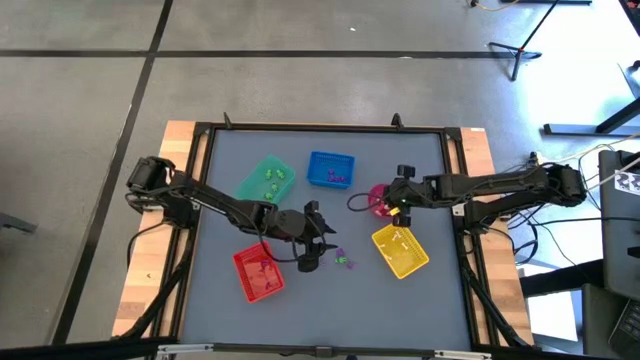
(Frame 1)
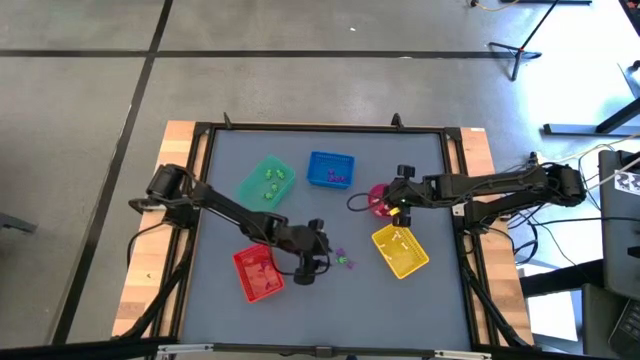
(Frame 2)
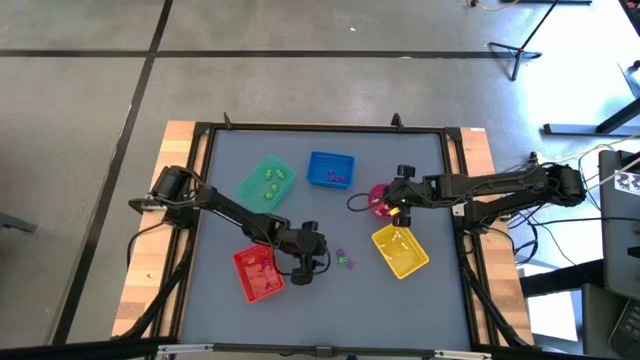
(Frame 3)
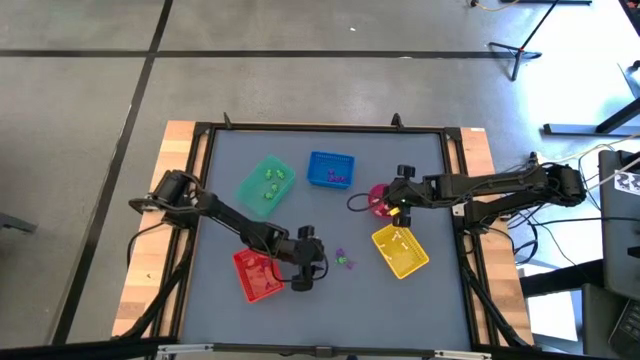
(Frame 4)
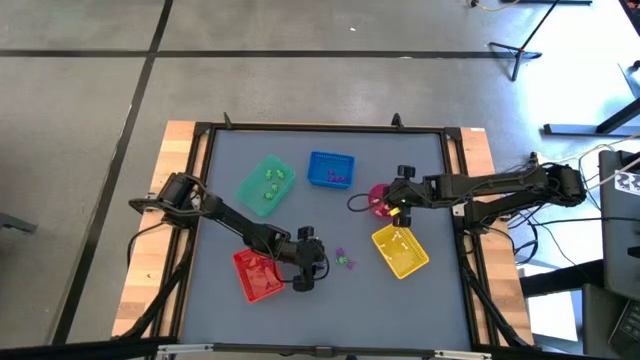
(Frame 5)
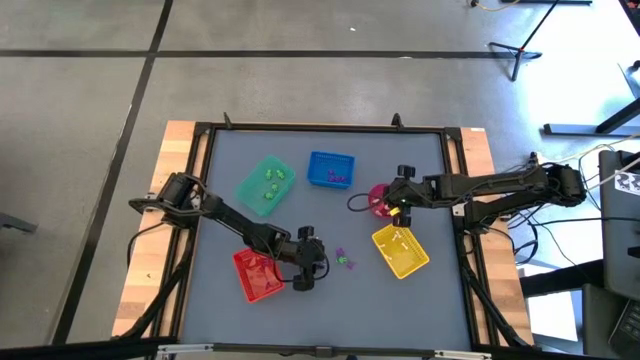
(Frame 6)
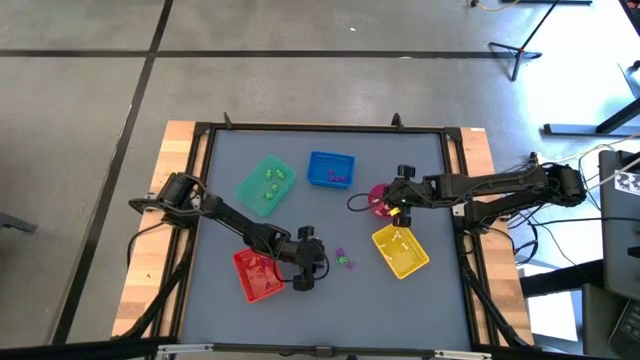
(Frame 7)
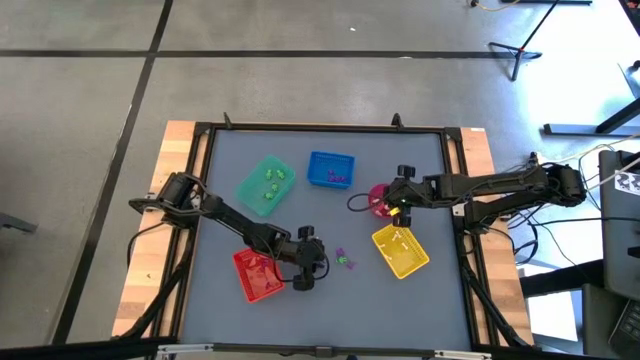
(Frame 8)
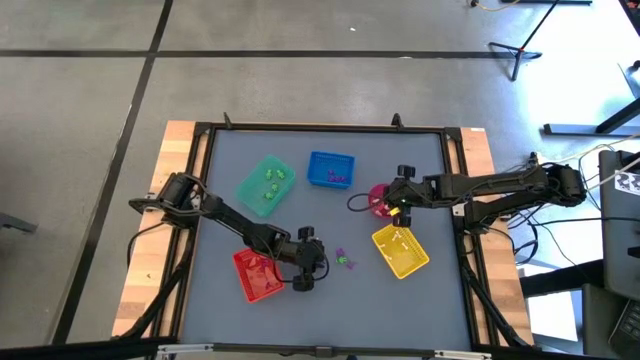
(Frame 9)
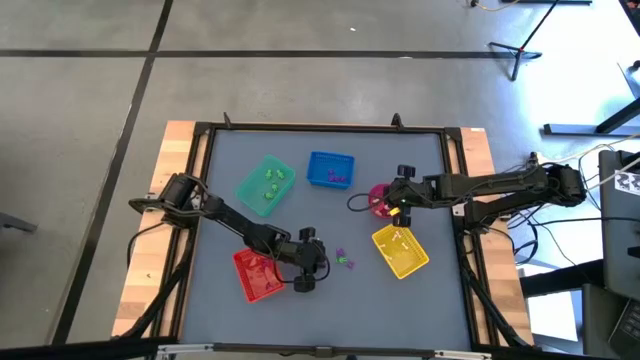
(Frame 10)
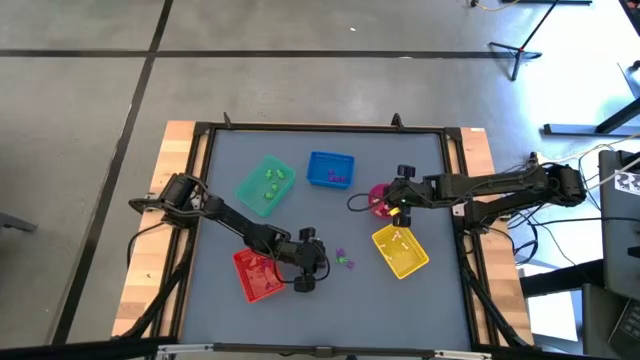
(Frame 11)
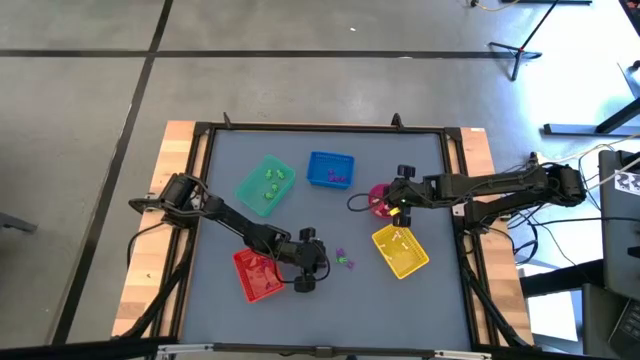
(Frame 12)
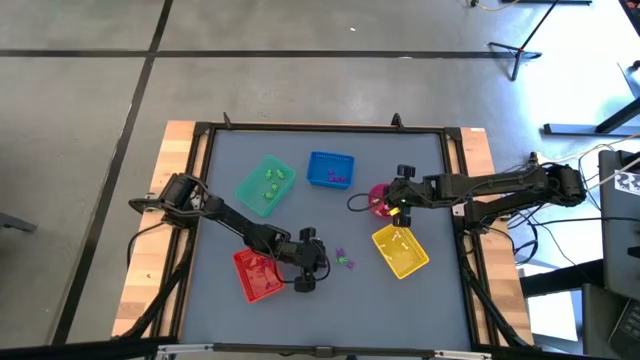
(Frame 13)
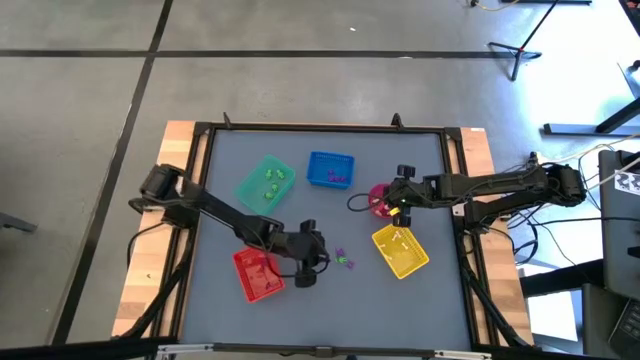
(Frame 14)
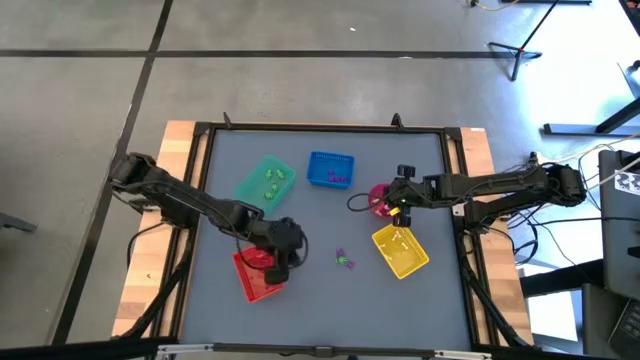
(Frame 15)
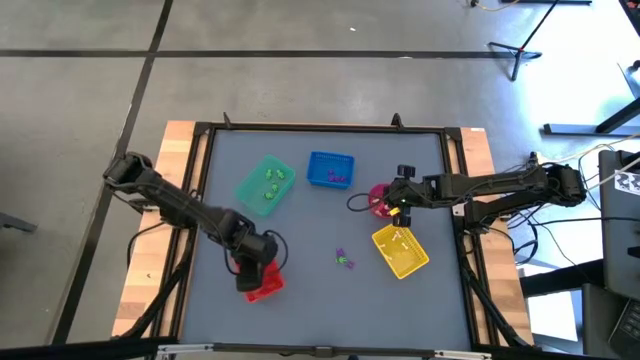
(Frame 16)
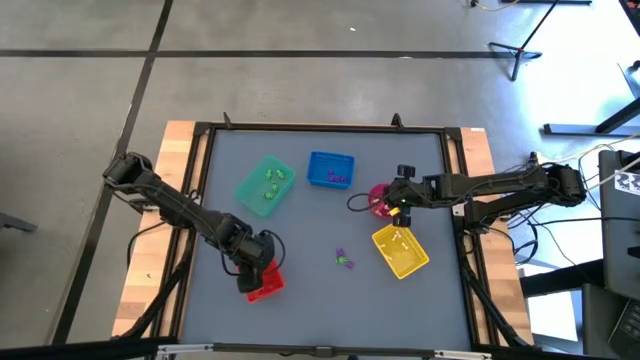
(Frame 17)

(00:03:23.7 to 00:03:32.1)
Task: Sort Halloween decoration
Put the purple witch hat toy into the orange bin

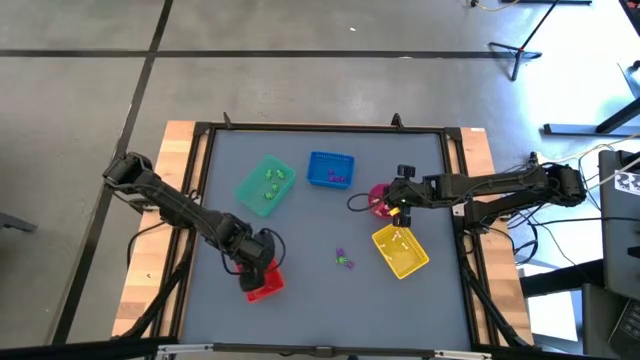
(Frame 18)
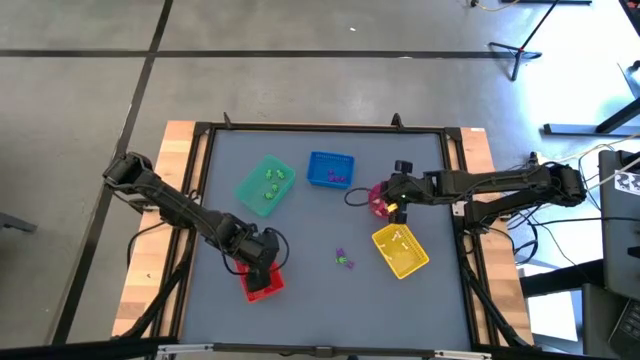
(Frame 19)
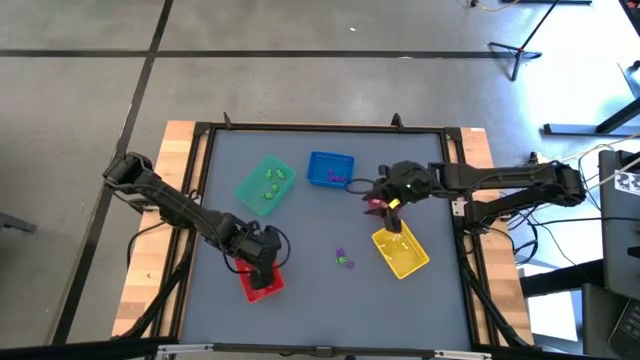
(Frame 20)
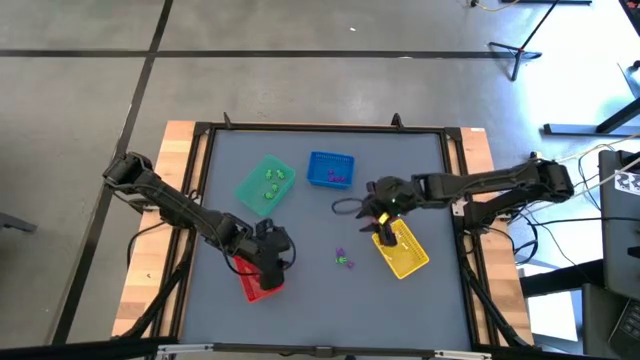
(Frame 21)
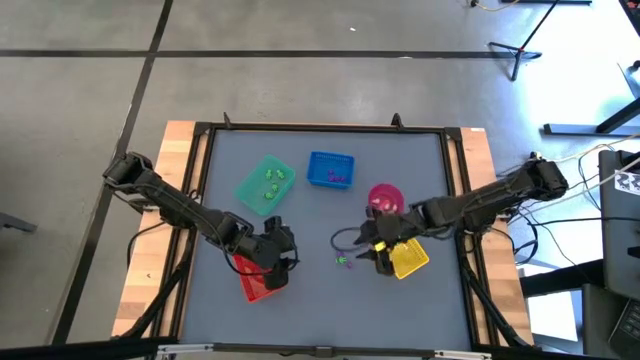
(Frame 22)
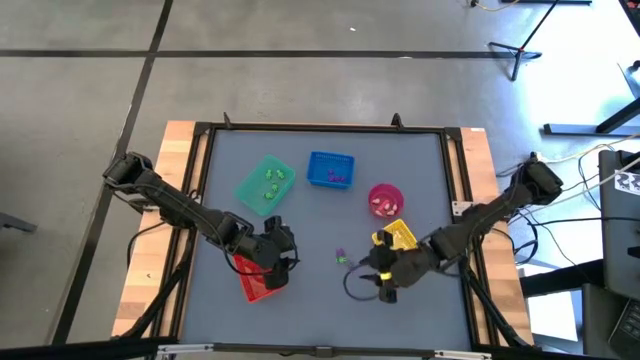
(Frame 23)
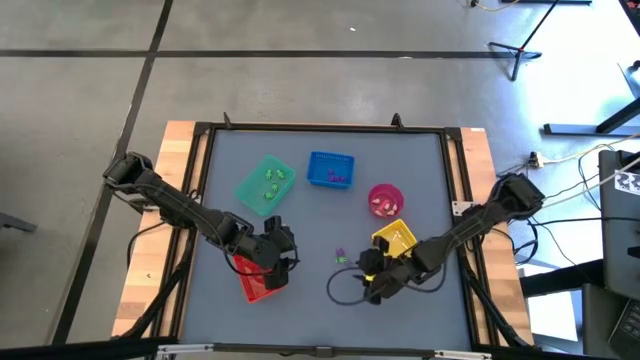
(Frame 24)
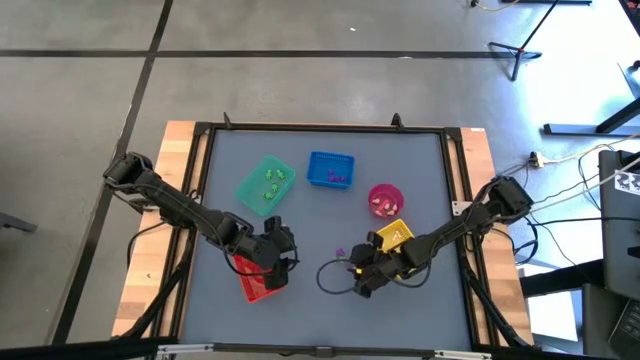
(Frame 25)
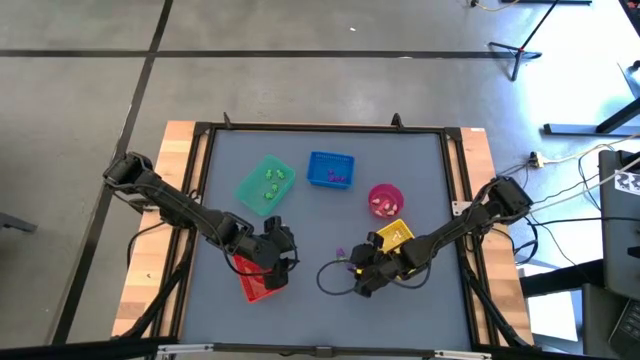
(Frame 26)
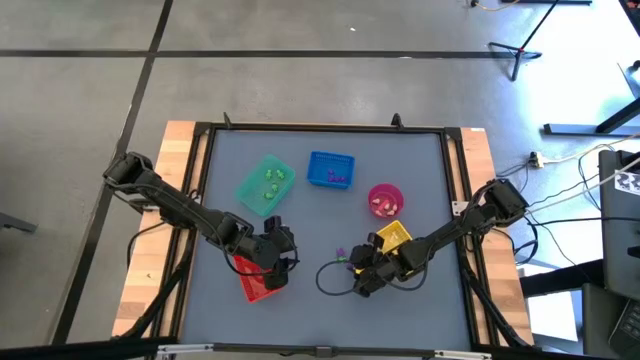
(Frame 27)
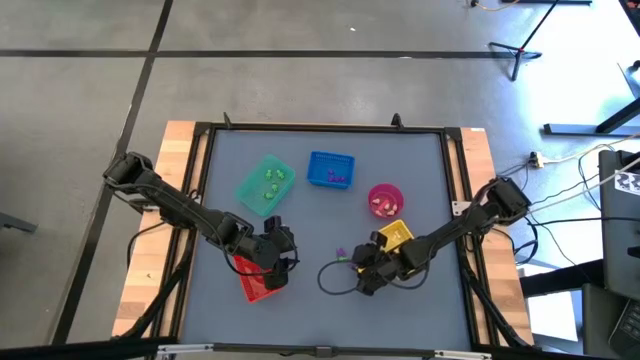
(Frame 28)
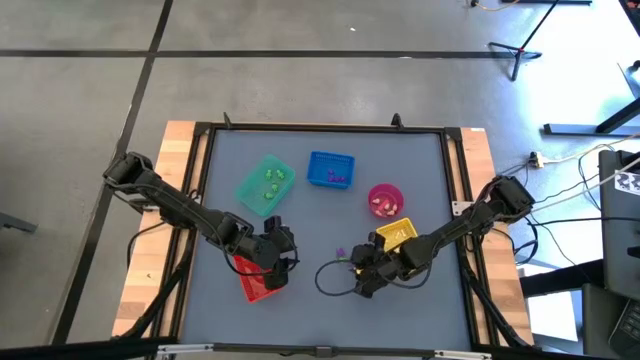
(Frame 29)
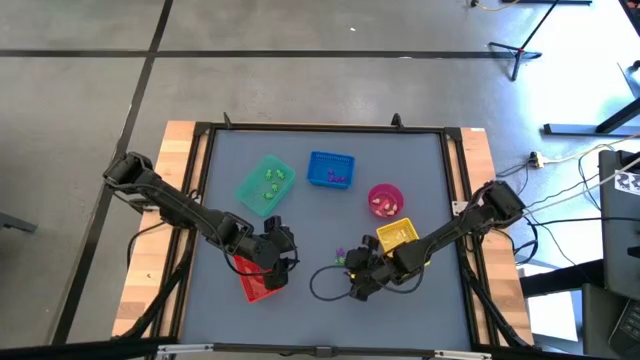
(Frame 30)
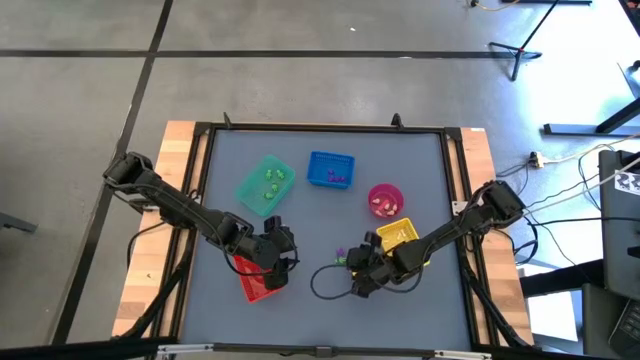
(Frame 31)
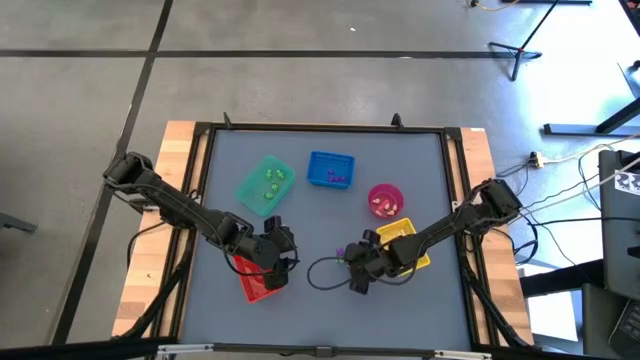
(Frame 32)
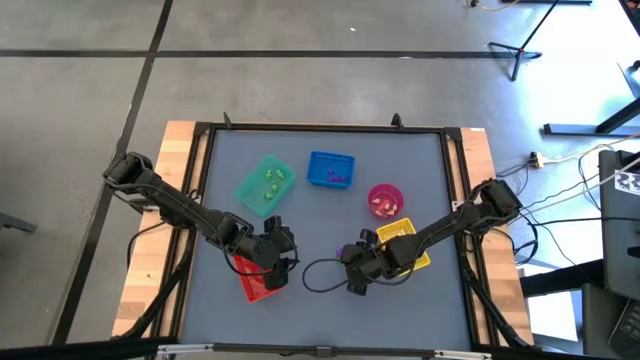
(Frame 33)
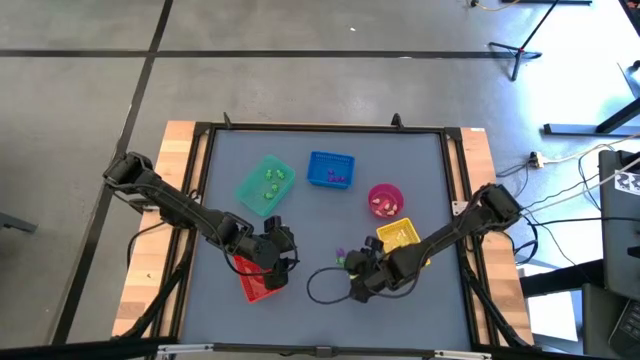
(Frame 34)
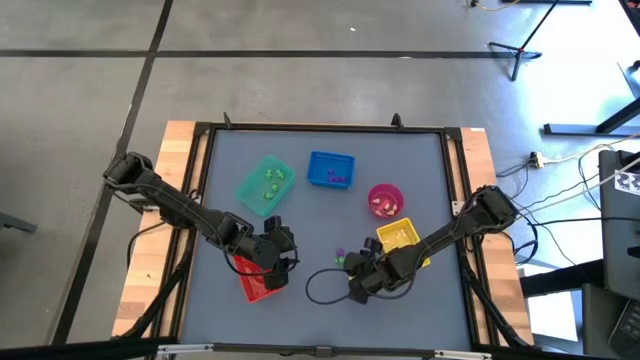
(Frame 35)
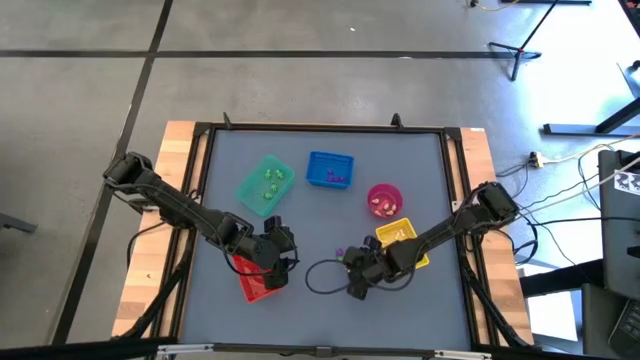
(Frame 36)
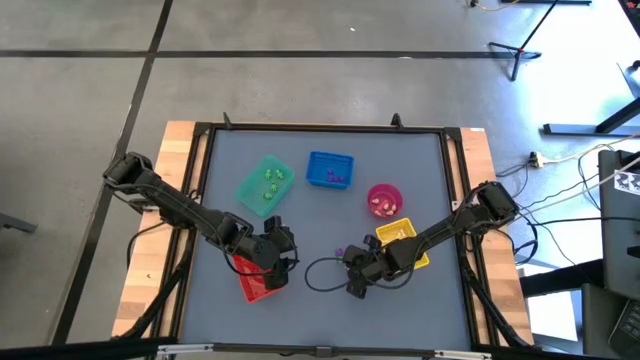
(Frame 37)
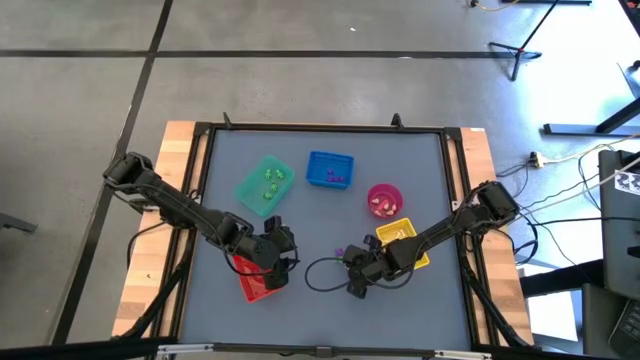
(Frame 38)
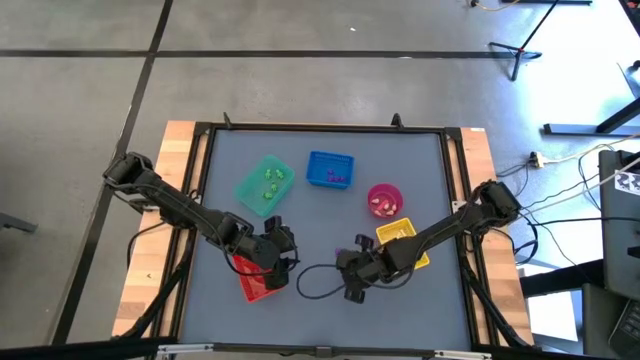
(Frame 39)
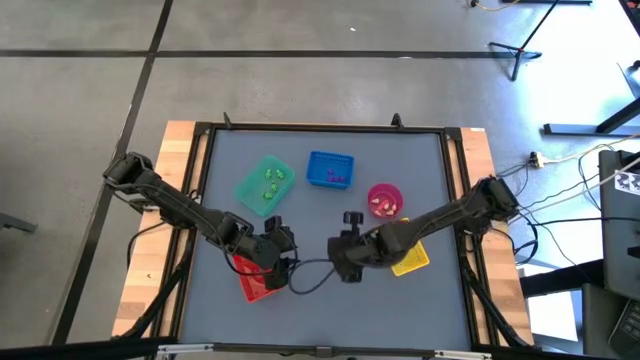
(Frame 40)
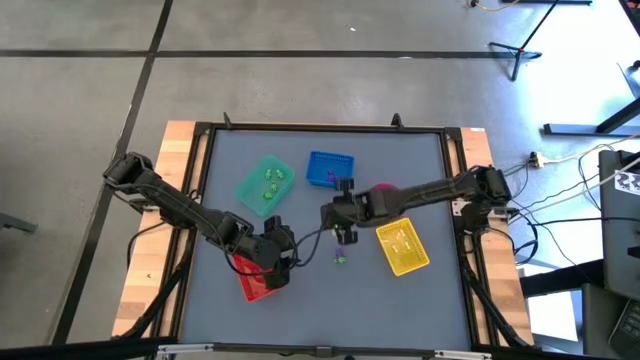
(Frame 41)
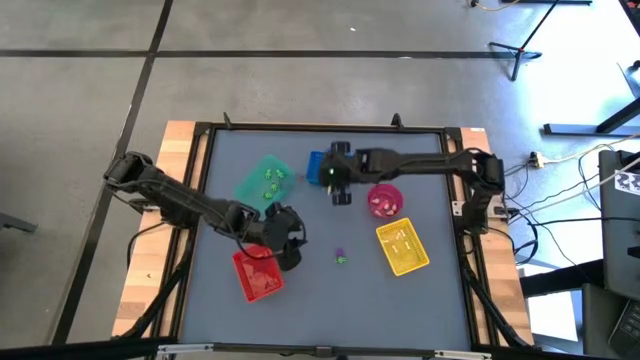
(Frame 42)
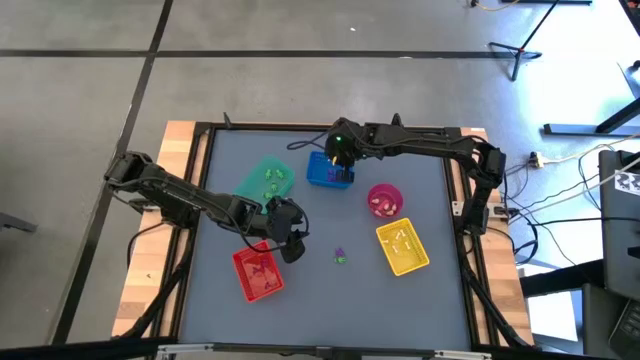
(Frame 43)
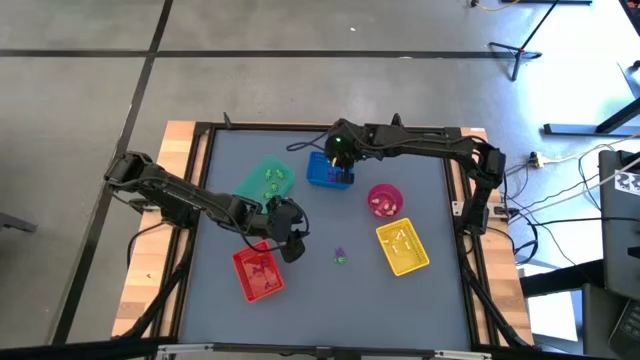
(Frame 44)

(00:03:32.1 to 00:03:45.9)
Put the purple spider toy into the blue bin
